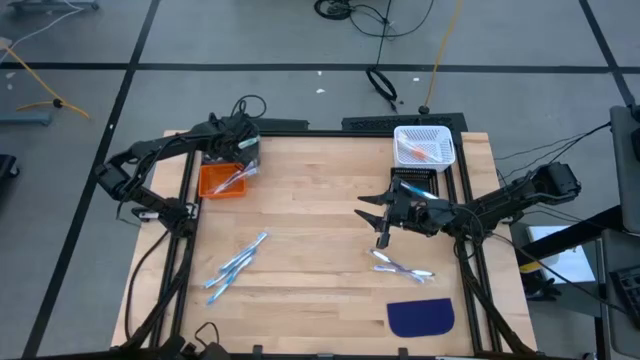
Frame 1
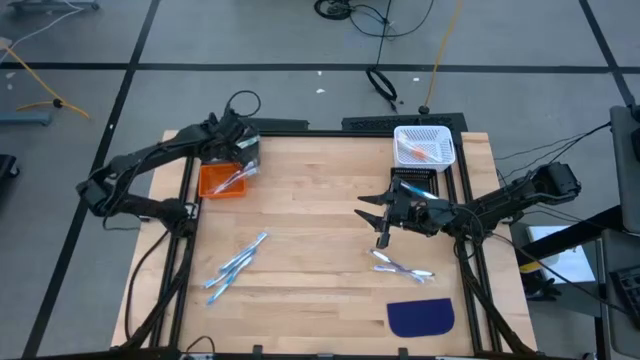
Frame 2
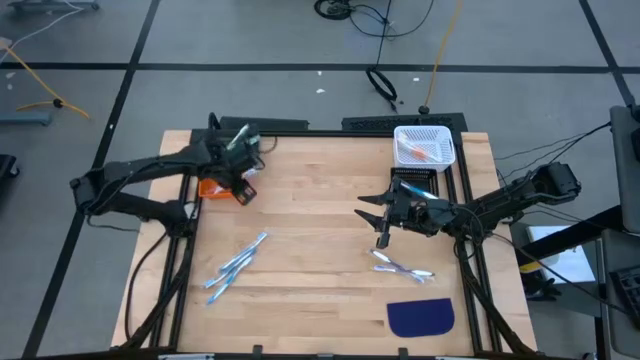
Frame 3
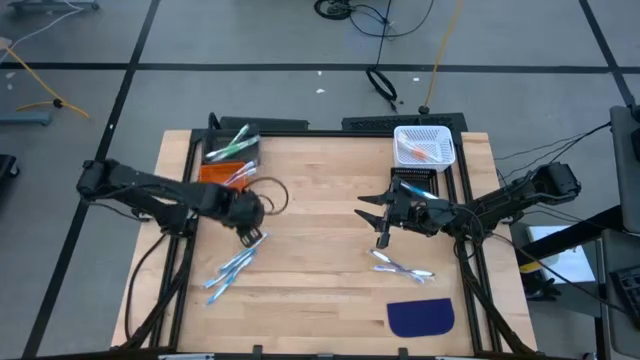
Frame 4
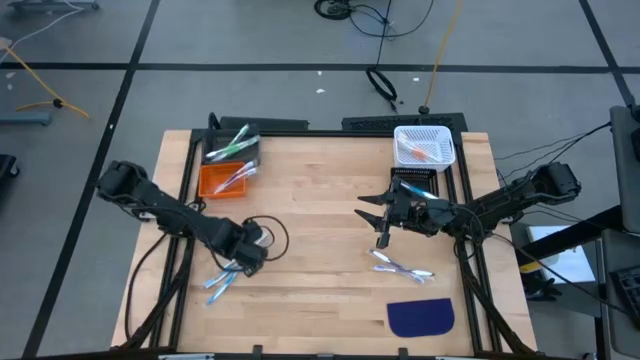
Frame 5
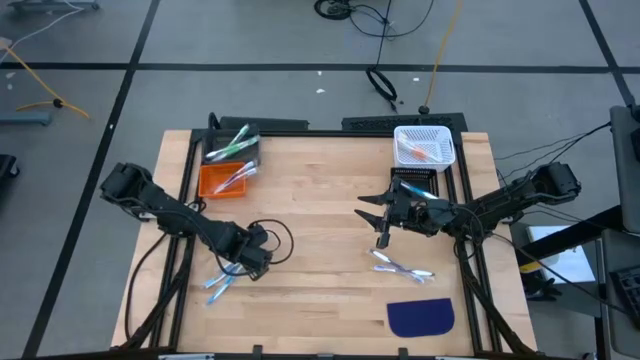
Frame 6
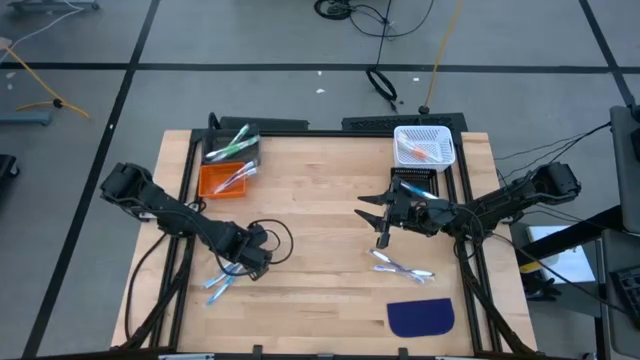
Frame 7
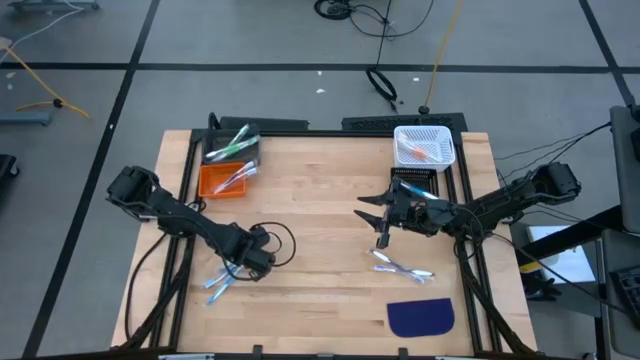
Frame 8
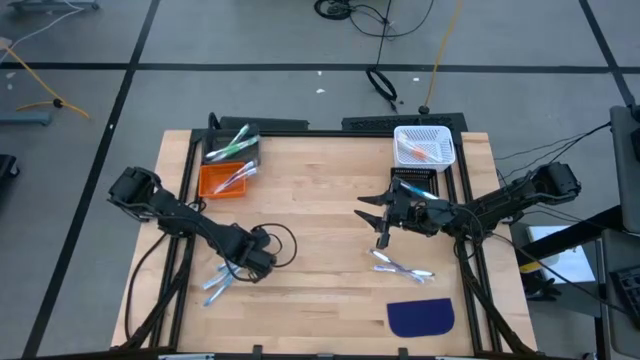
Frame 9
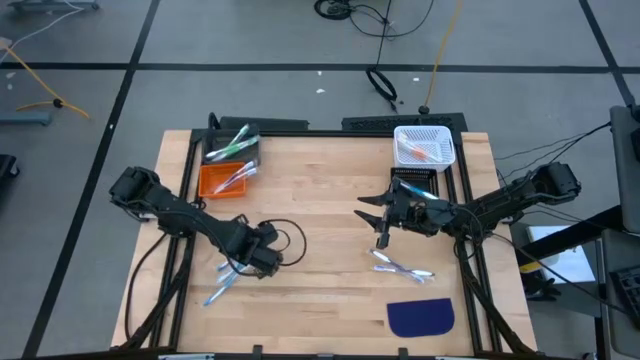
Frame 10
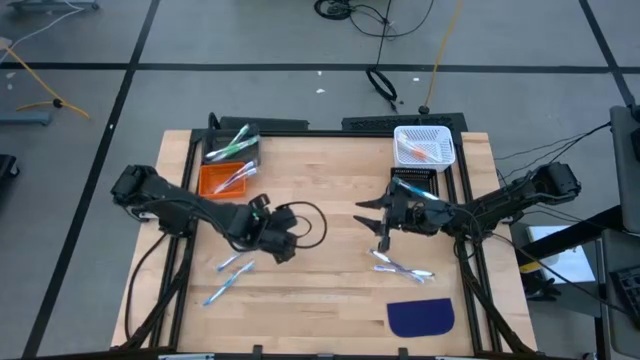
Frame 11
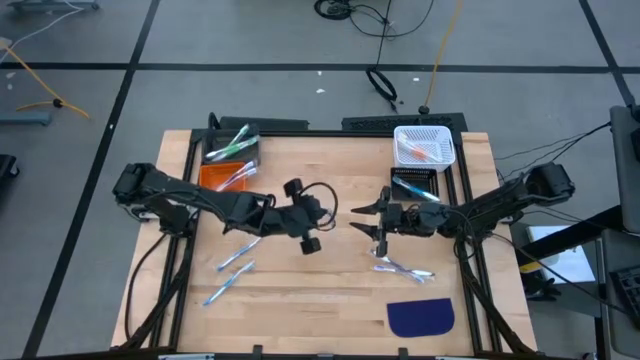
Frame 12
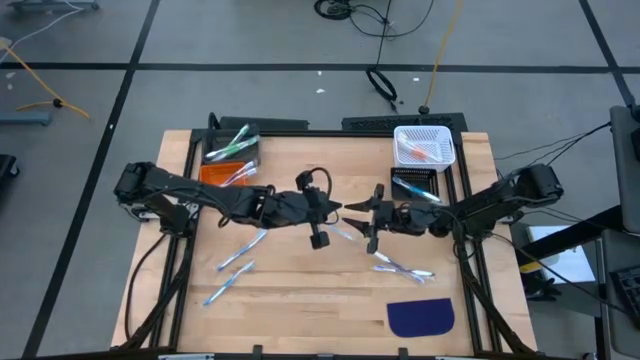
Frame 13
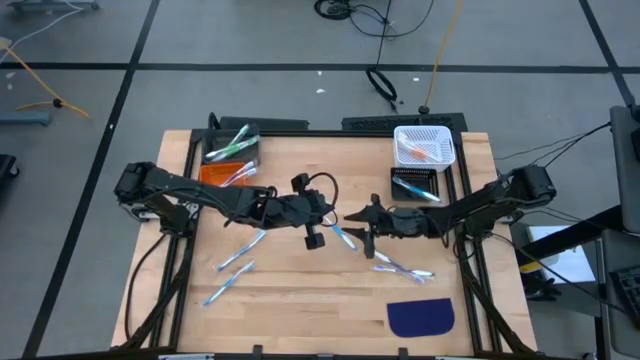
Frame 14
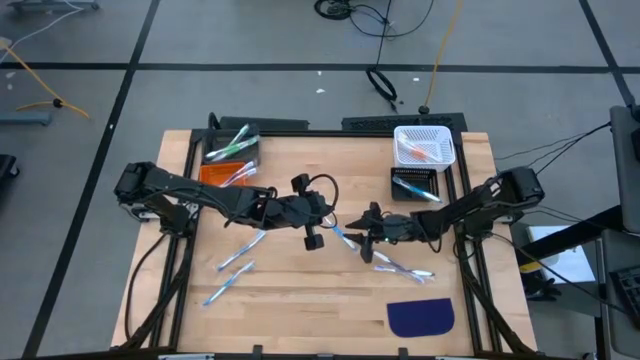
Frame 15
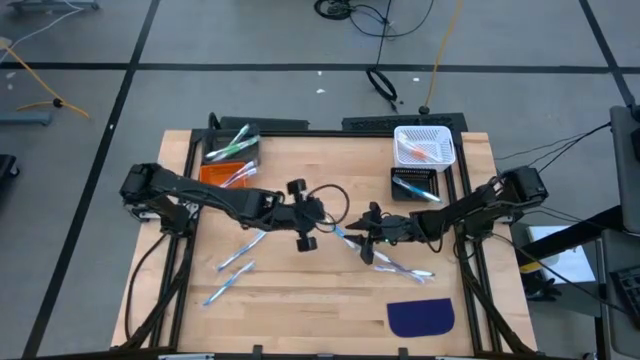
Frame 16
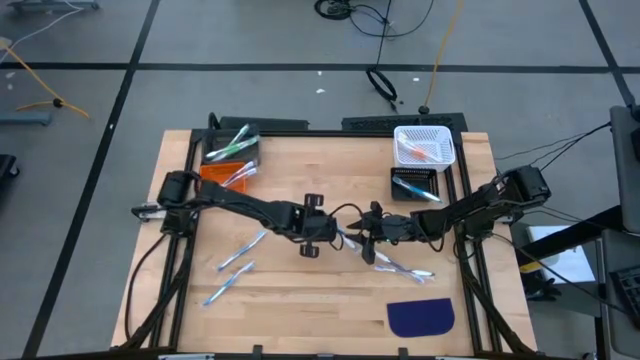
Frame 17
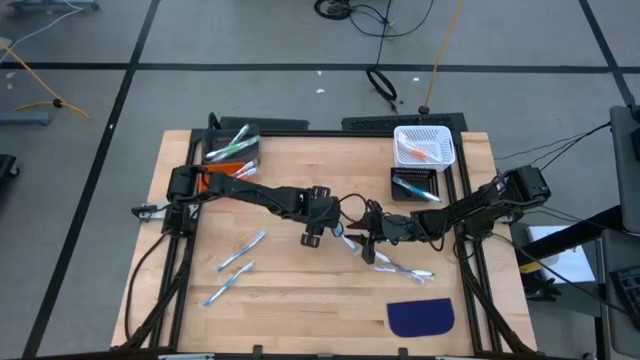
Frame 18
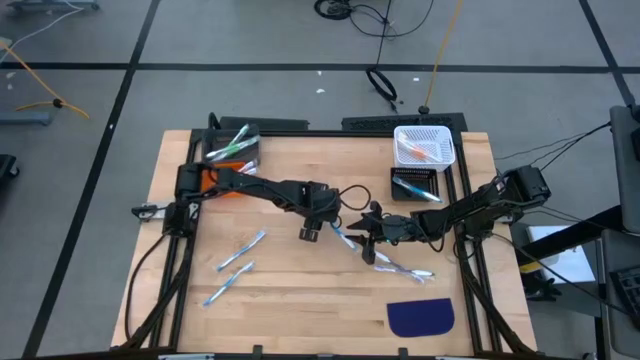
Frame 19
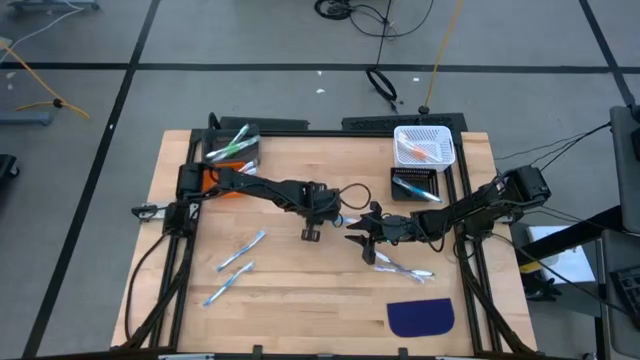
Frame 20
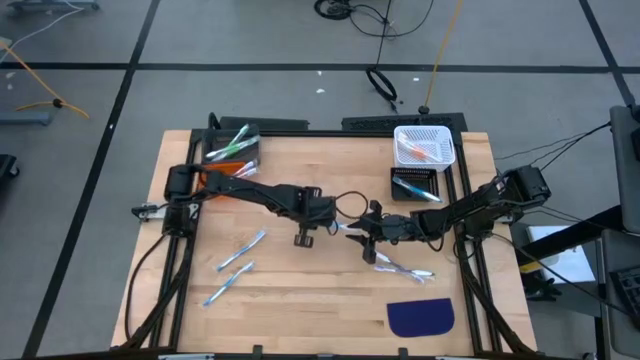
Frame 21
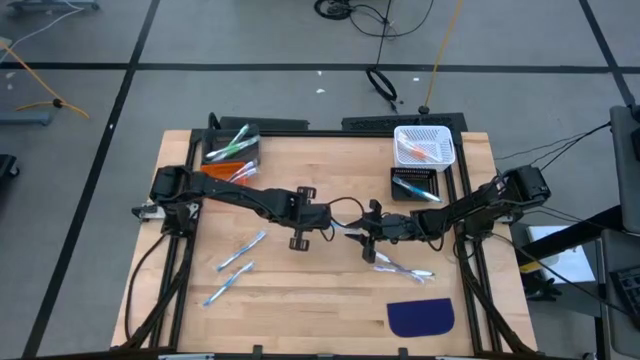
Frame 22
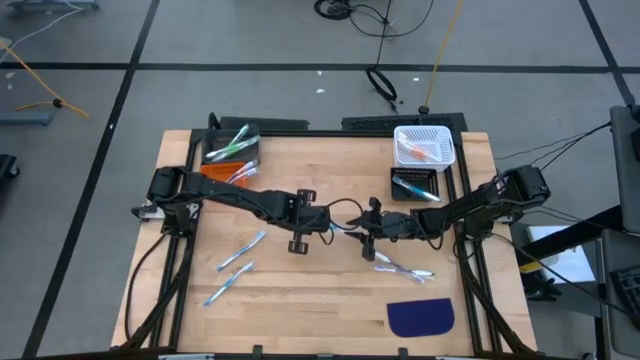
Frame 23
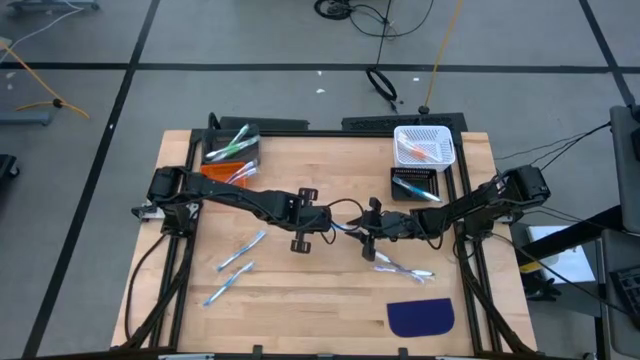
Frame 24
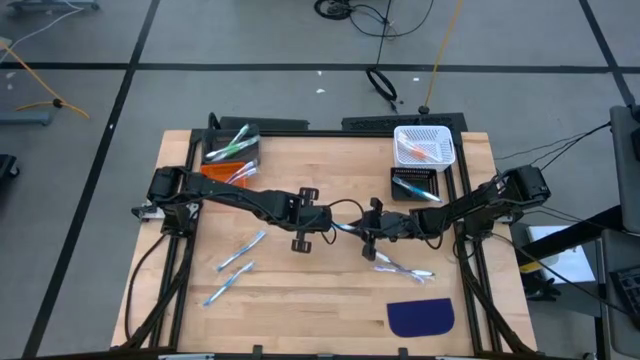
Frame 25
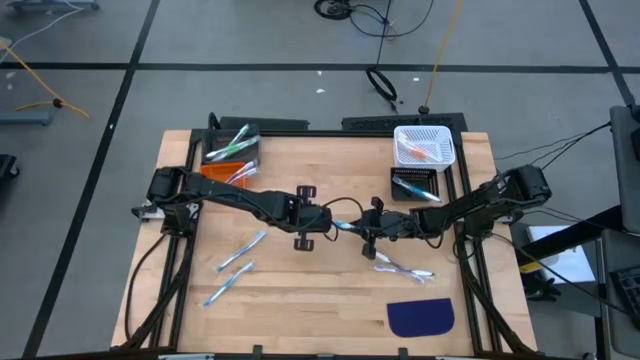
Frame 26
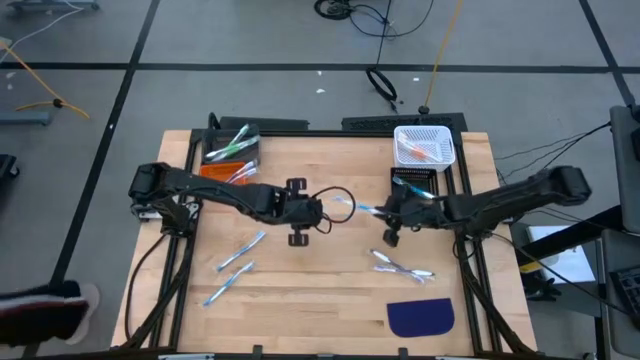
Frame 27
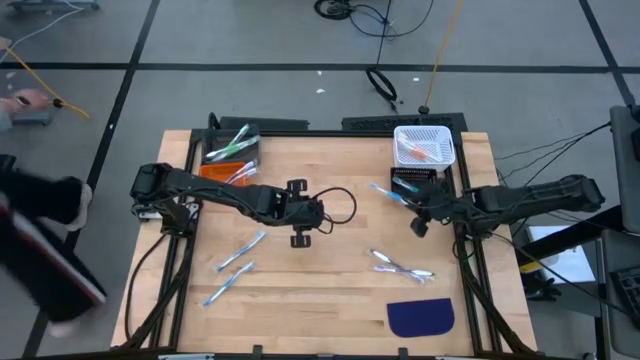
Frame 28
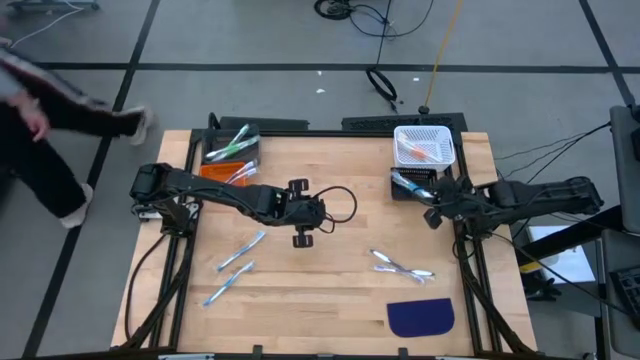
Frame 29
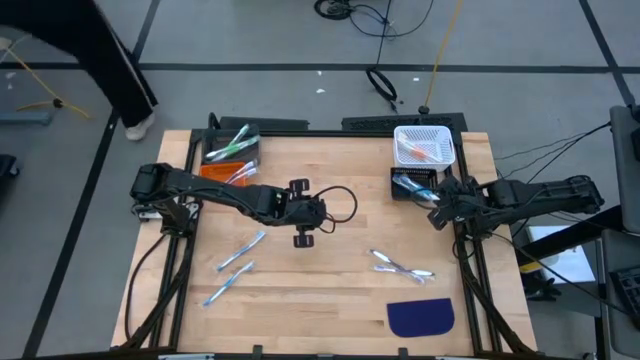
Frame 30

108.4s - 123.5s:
Task: Pick & Place Toothbrushes
Put the blue toothbrush into the black bin

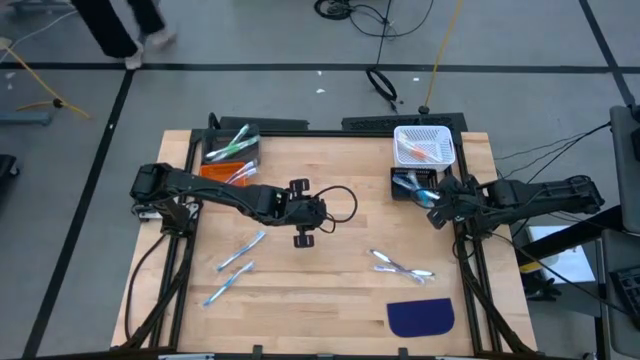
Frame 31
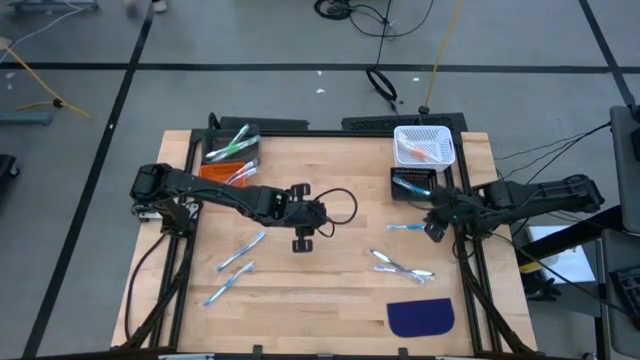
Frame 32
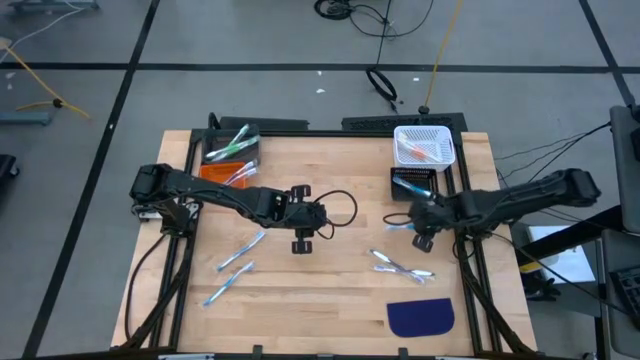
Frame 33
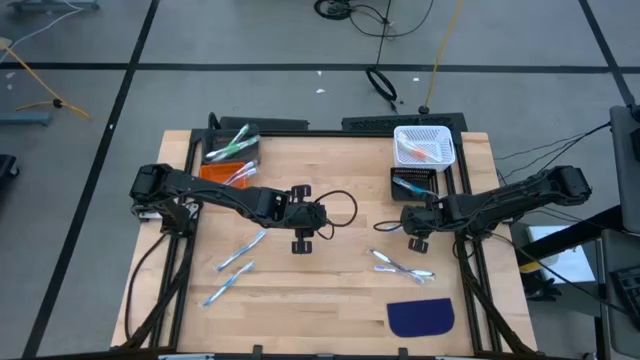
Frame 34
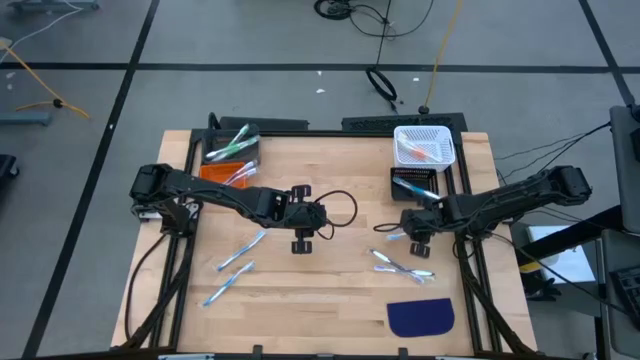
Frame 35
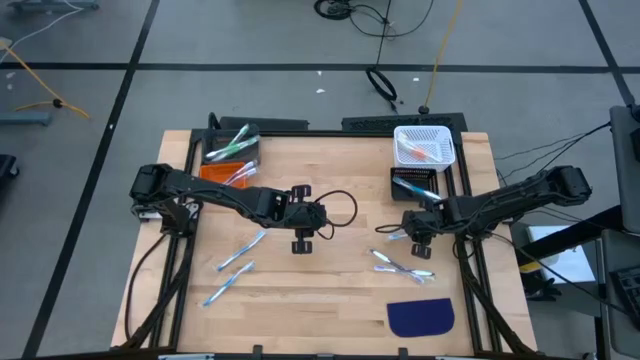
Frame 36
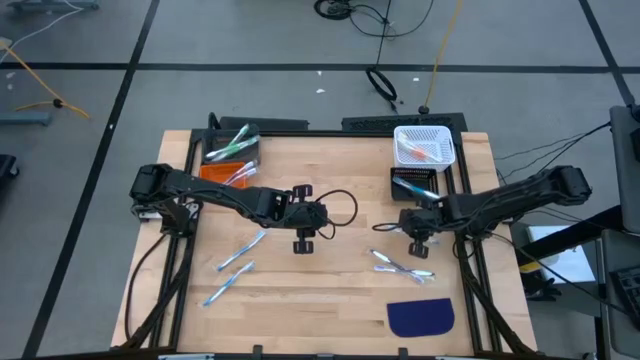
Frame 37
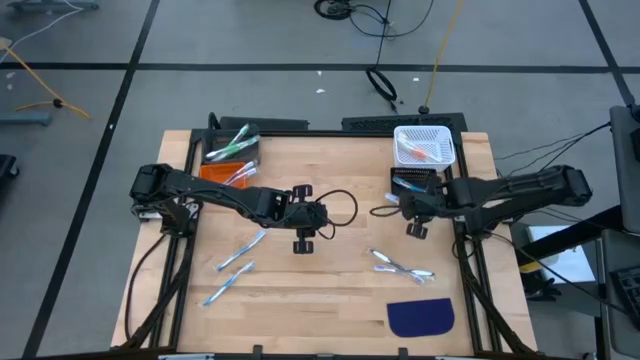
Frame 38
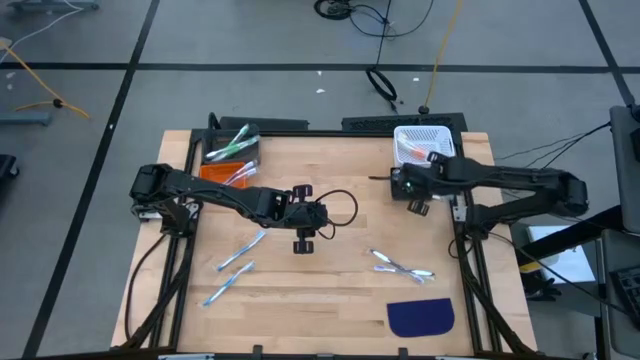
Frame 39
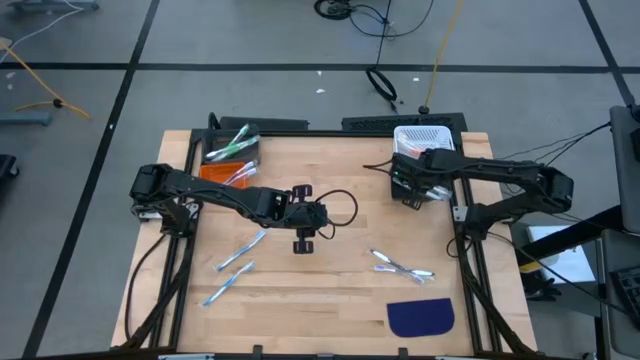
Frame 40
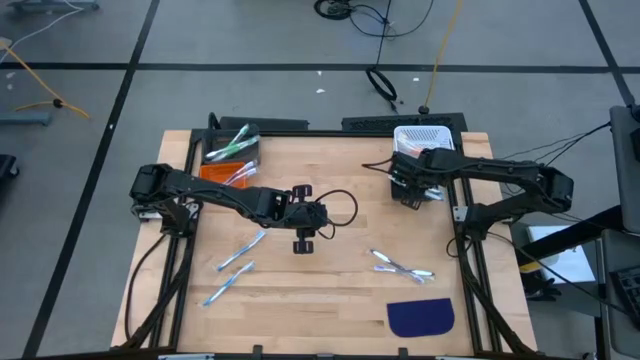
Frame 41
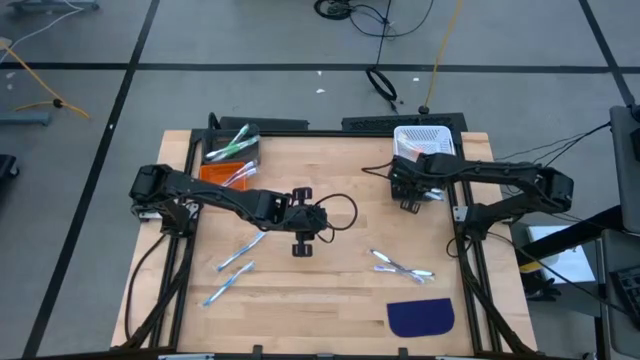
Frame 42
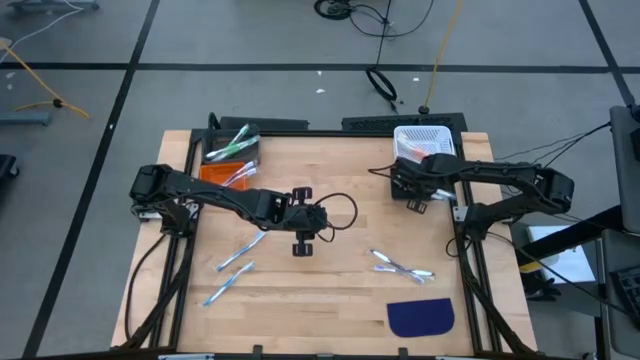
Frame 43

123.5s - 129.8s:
Put the blue toothbrush into the black bin

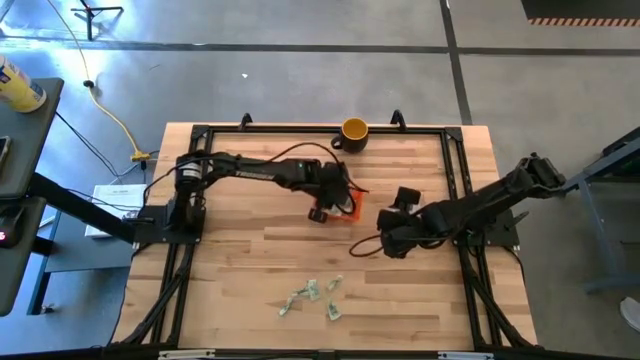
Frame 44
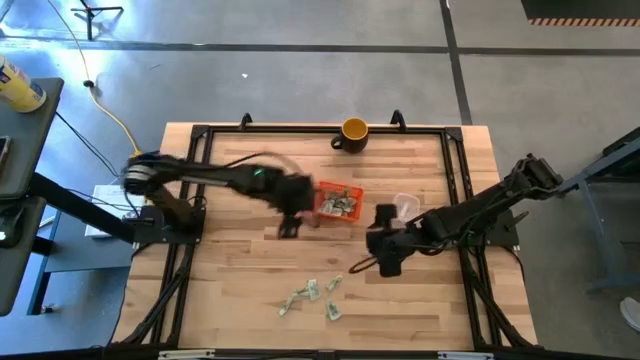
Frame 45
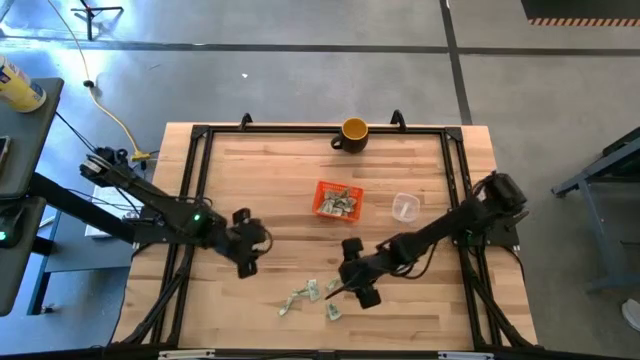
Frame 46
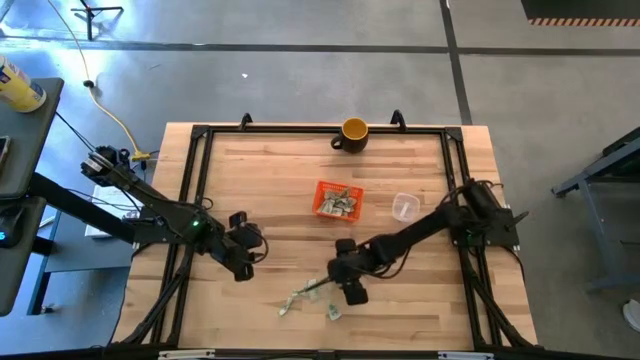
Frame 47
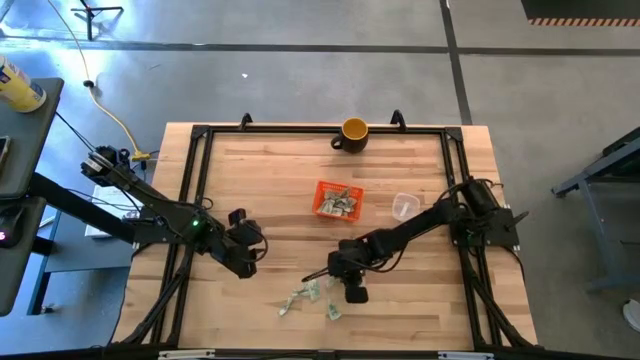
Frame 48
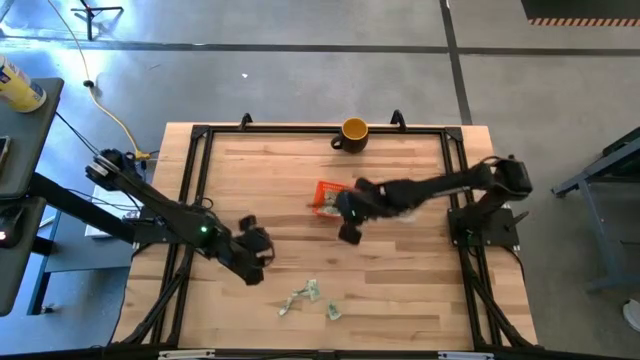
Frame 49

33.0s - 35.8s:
Task: Pick and place items into bin
Put the white stevia packet into the orange bin
